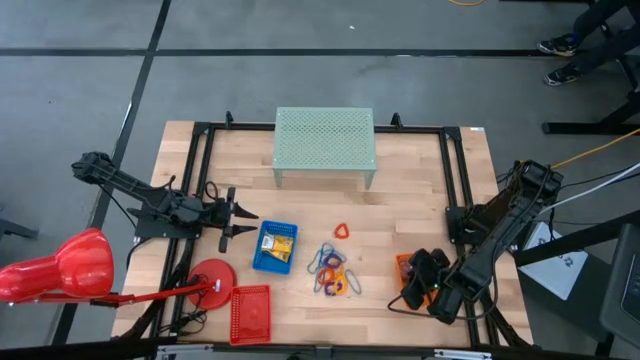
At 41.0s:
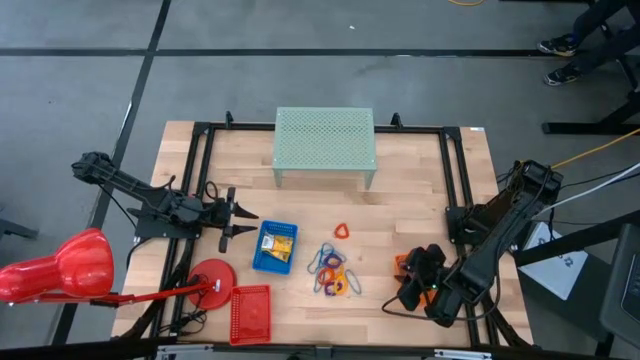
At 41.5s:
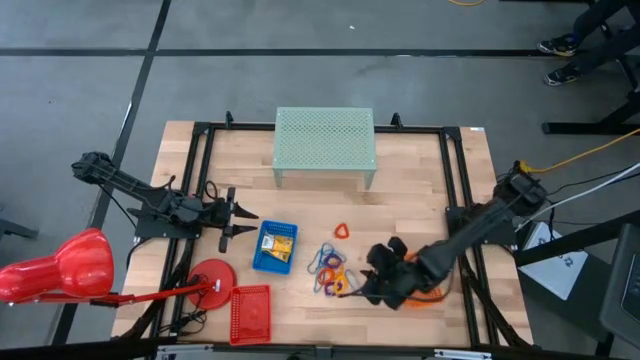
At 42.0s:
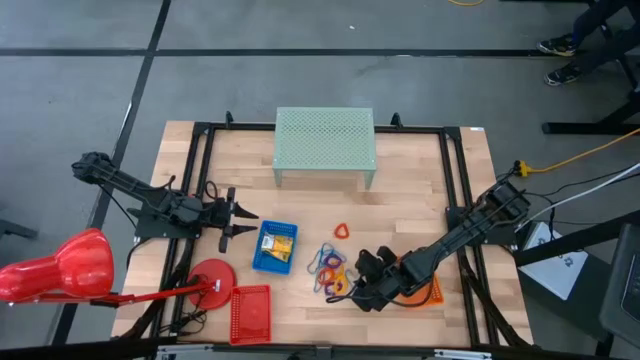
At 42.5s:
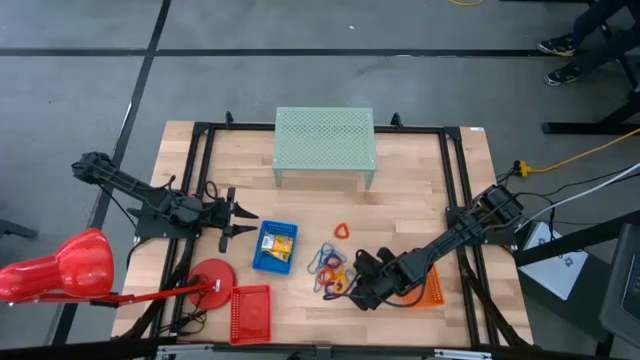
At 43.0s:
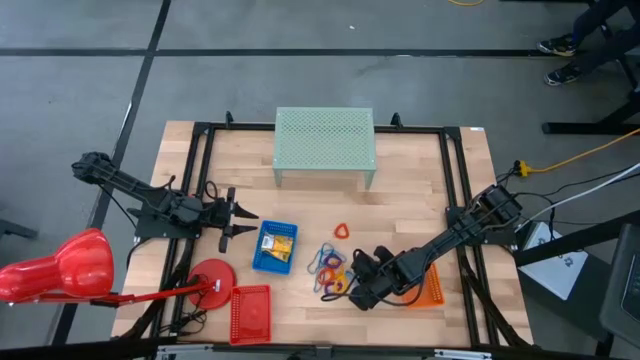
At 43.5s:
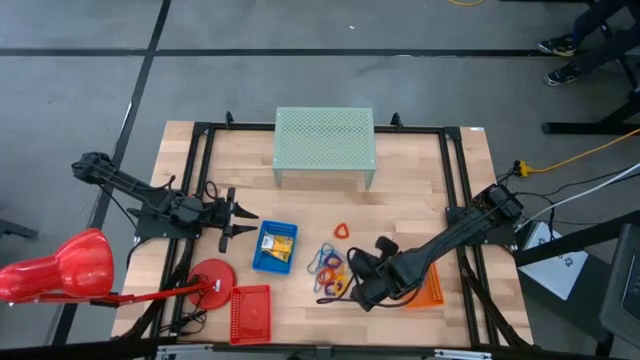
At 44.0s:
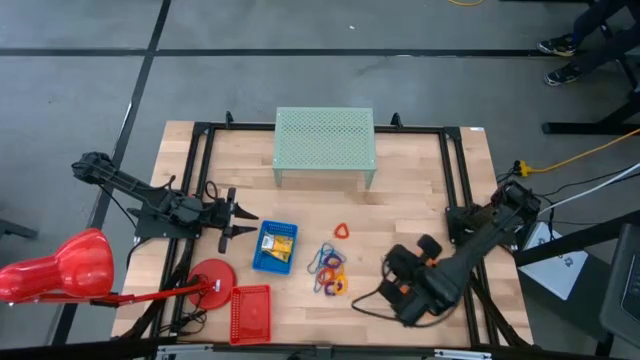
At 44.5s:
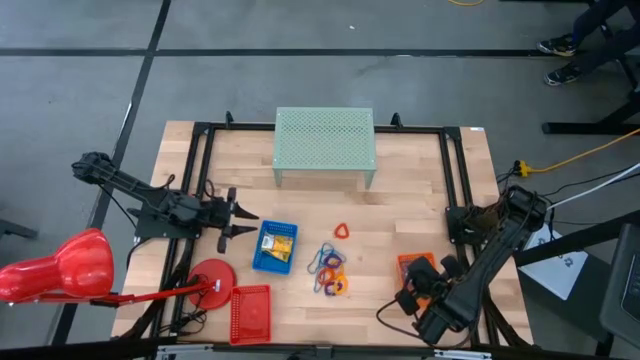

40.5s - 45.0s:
Task: Pick & Place Office Desk Supplies
Put the blue rubber band into the orange bin

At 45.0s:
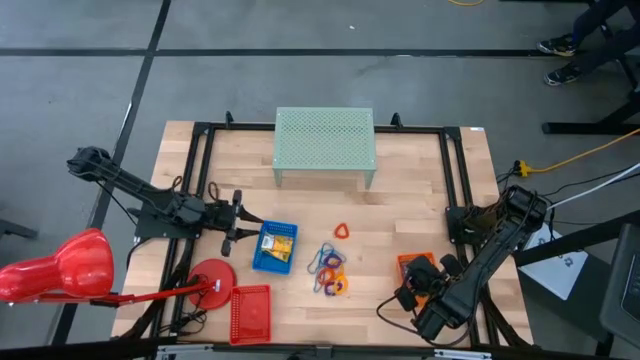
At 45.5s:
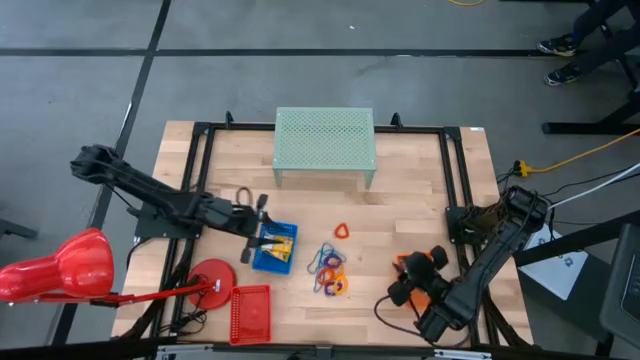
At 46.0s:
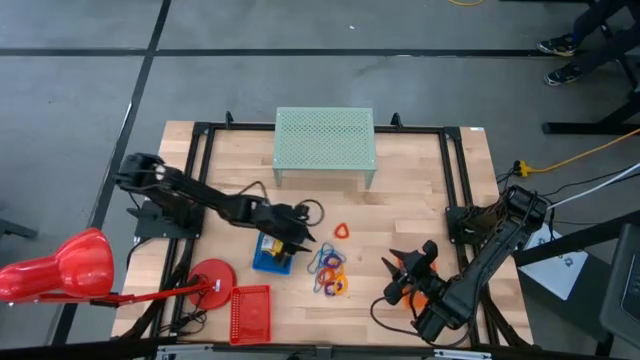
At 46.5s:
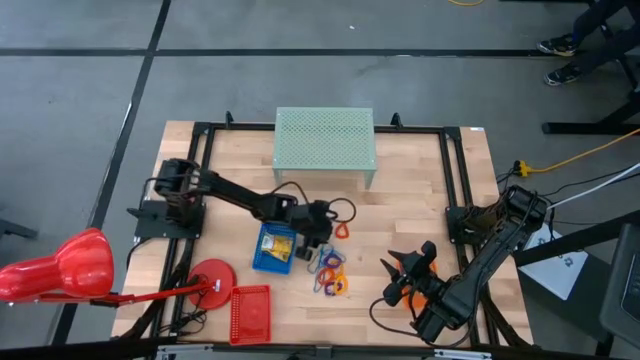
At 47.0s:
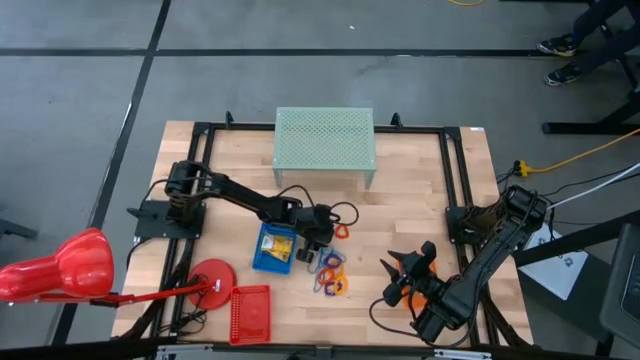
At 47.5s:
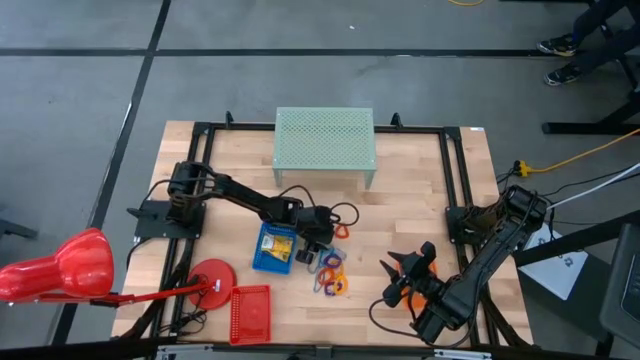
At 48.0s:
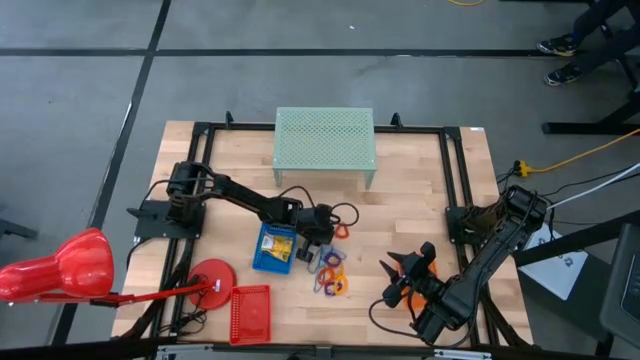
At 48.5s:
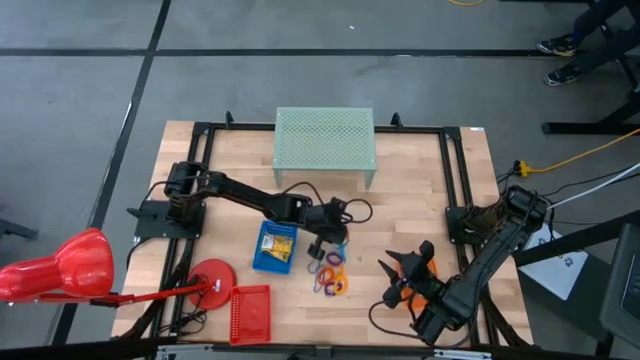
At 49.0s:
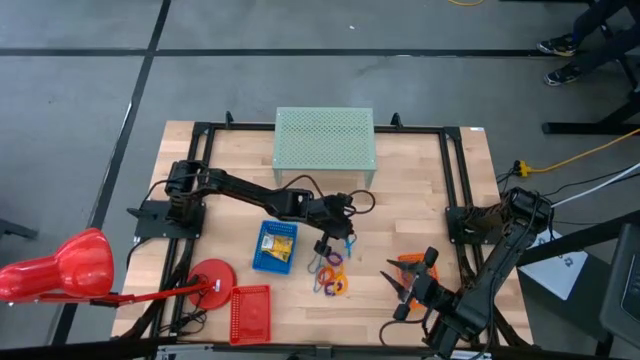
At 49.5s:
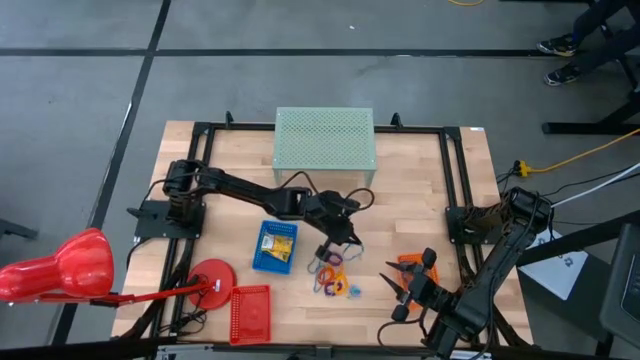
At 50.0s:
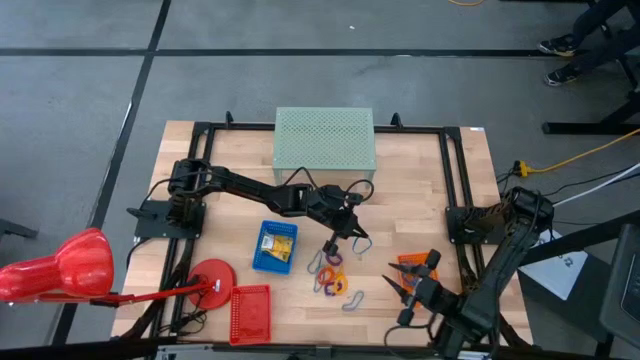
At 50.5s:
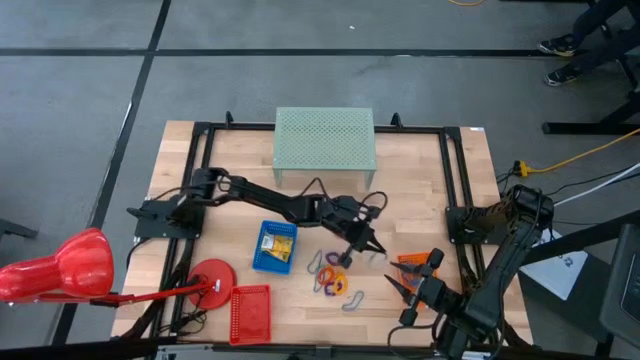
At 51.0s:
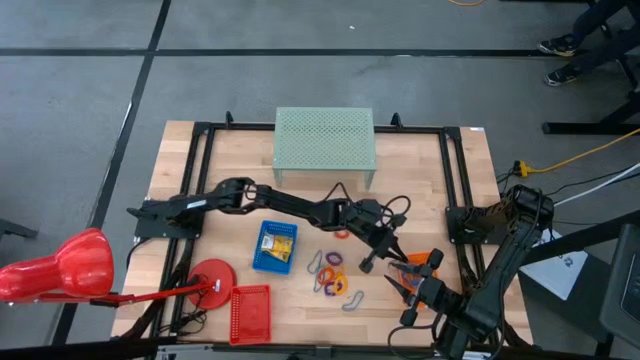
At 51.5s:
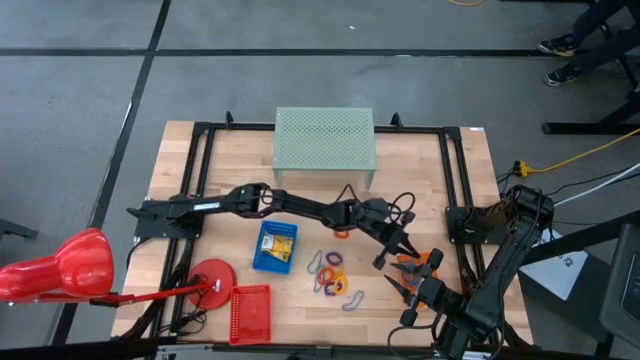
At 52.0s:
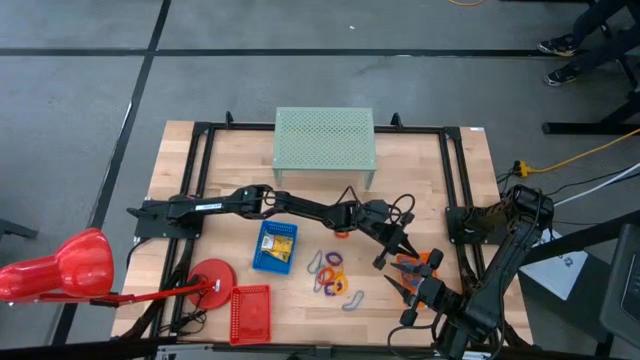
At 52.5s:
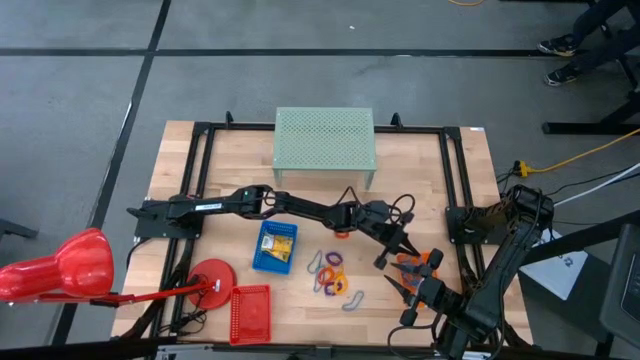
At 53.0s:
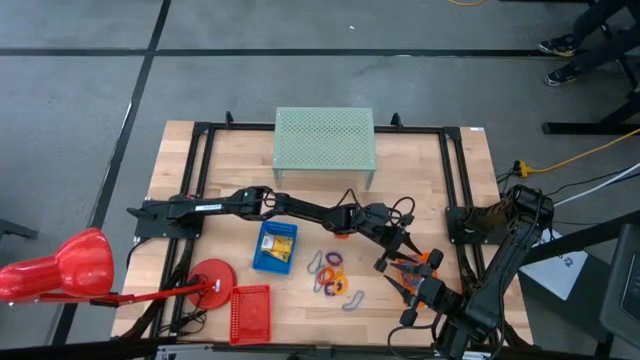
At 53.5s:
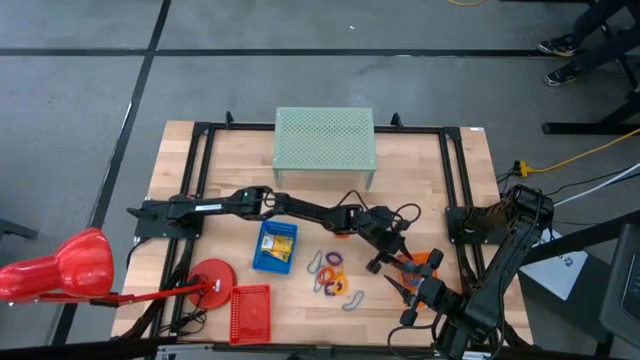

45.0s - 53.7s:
Put the blue rubber band into the orange bin

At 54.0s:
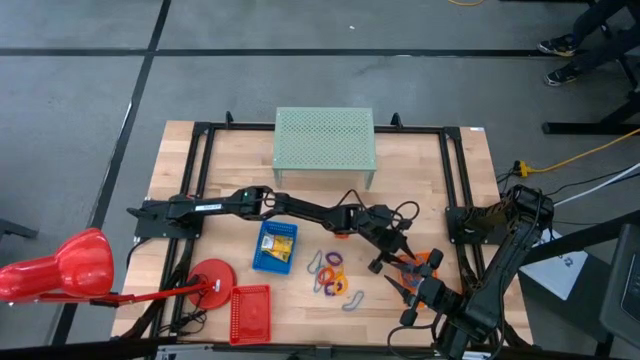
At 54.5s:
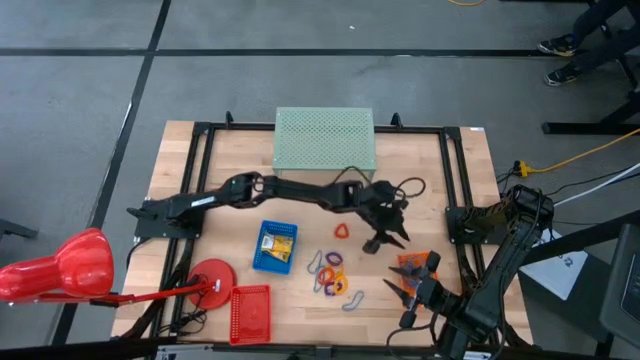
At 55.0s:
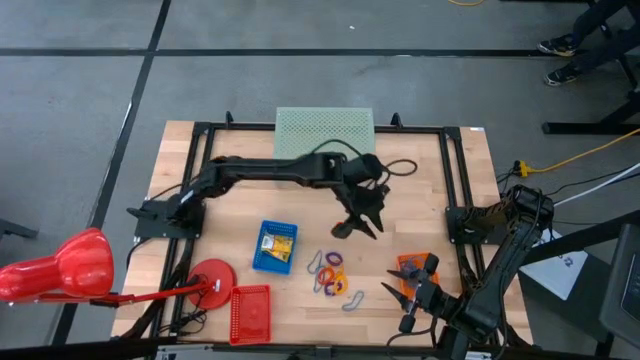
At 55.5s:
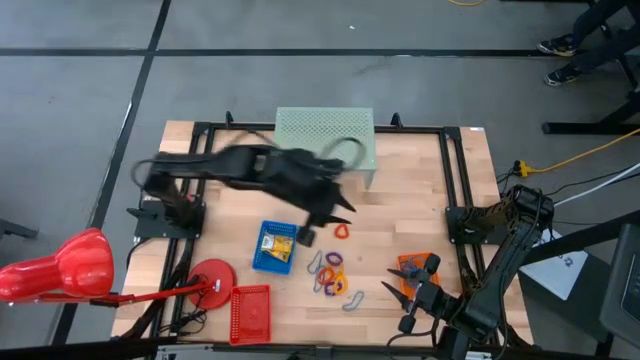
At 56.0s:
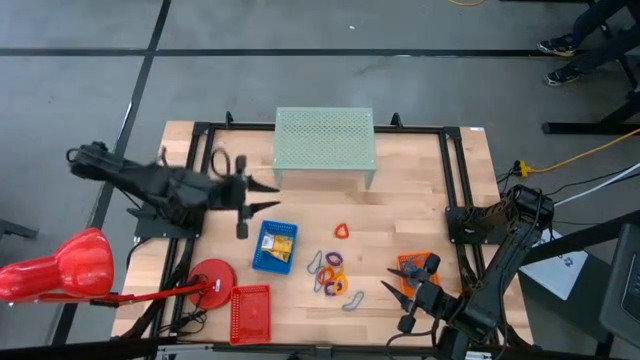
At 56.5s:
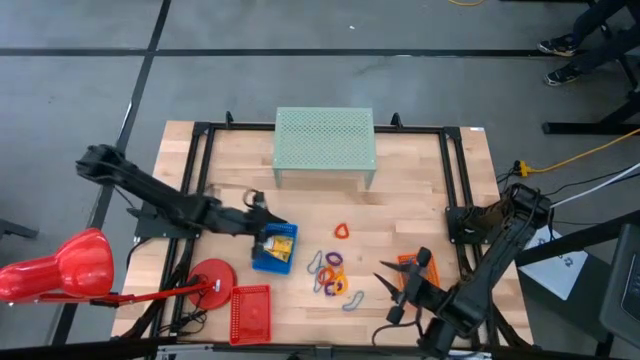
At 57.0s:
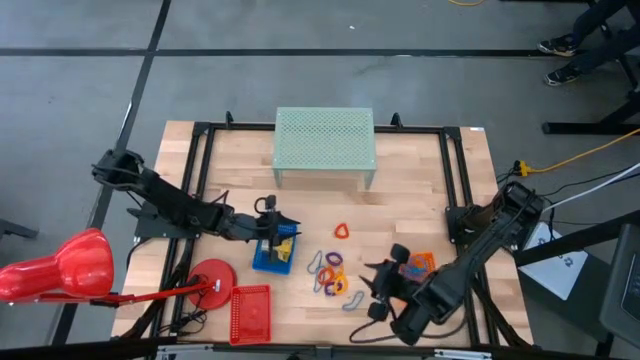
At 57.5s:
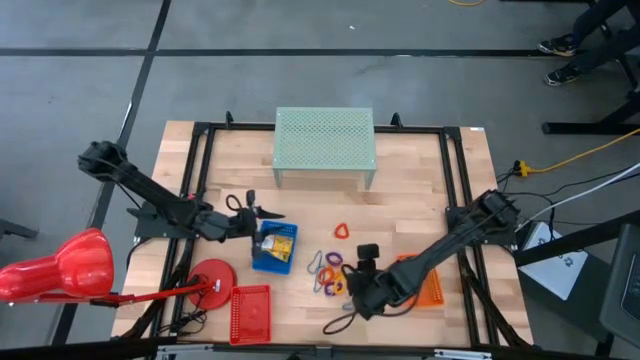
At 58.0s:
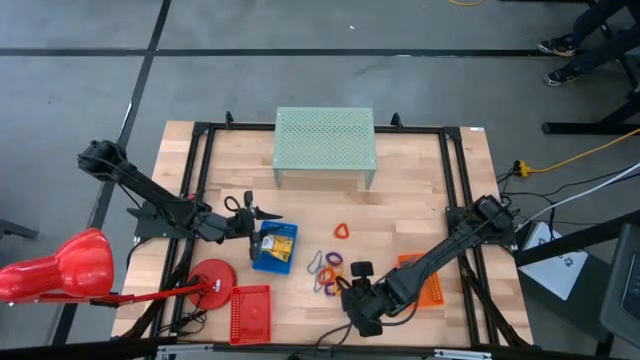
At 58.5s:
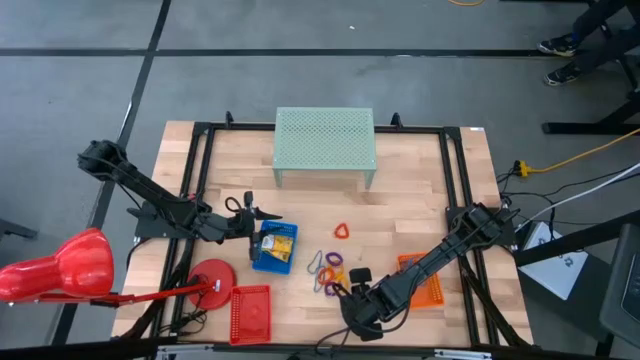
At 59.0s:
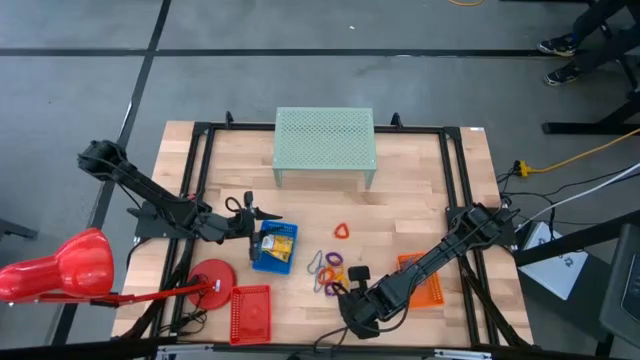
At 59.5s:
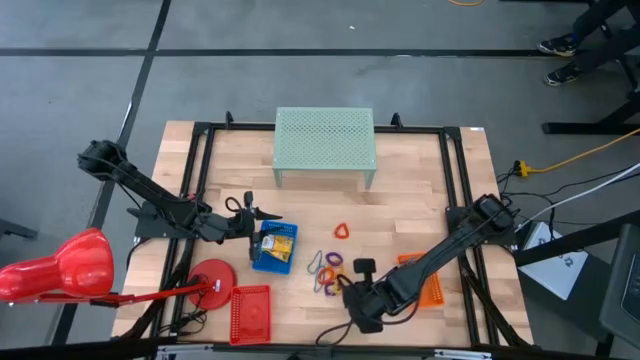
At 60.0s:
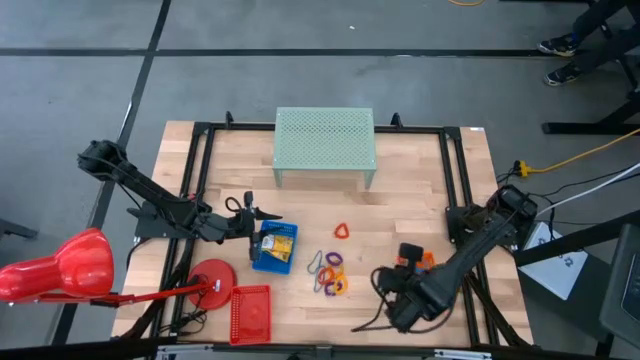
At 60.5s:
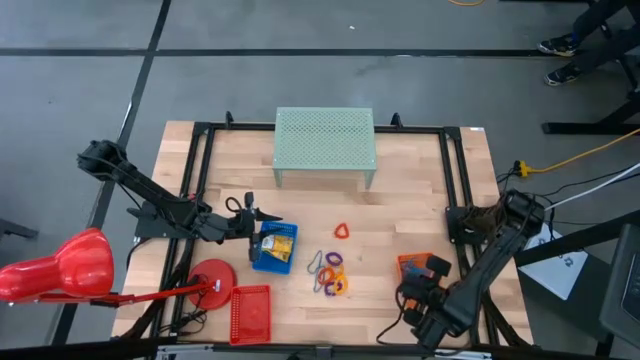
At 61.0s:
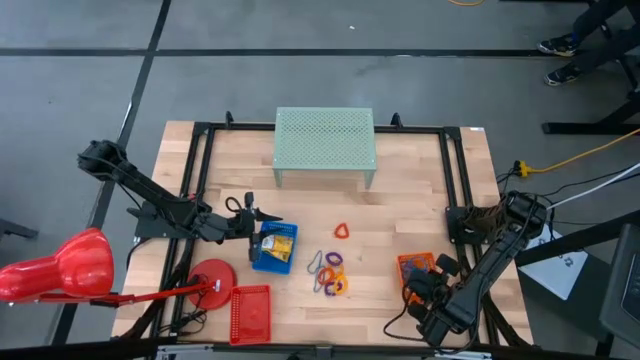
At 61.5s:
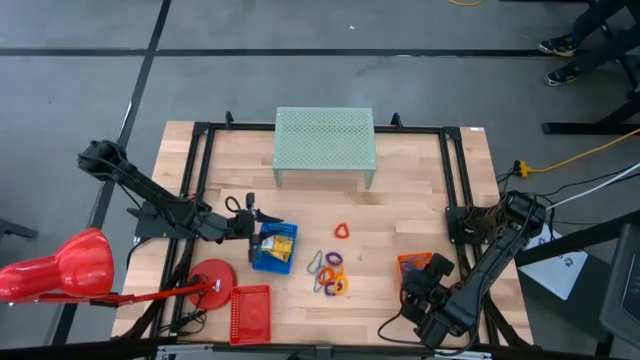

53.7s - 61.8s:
Put the blue rubber band into the orange bin

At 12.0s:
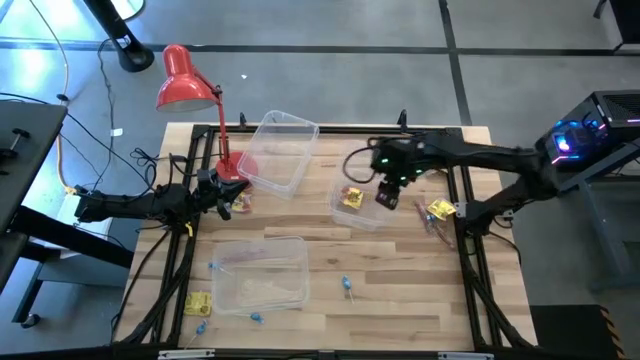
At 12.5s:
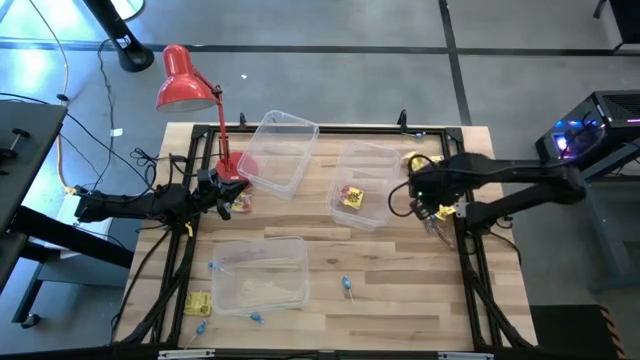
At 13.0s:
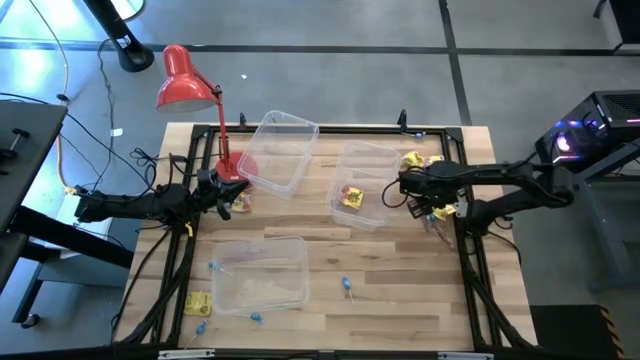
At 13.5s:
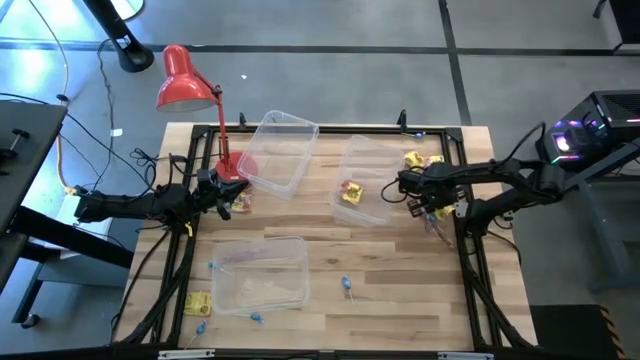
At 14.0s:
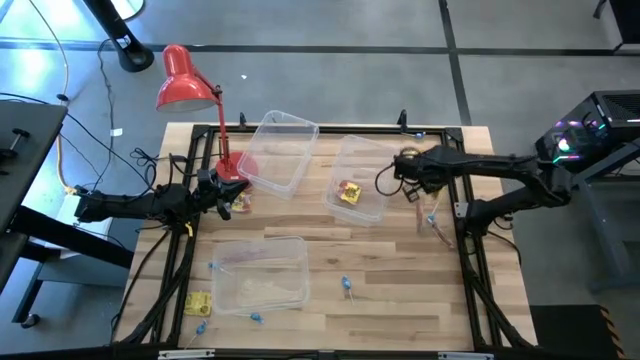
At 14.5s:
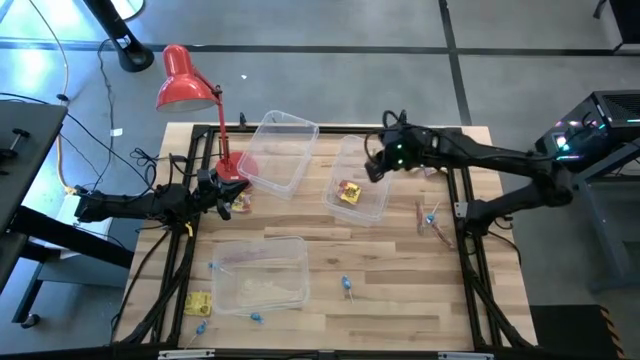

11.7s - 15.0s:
Task: Sort candy
Put the yellow candy into the top right transparent bin
